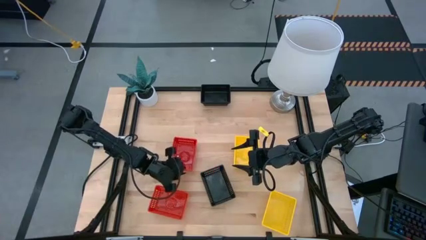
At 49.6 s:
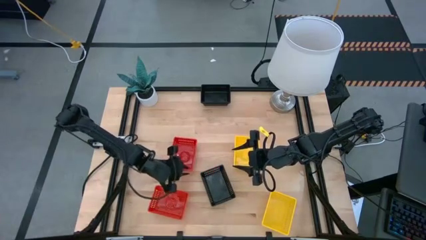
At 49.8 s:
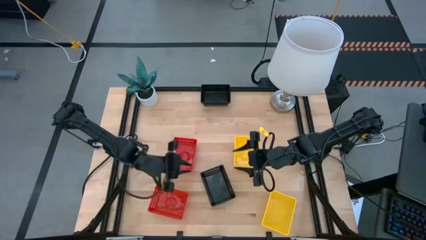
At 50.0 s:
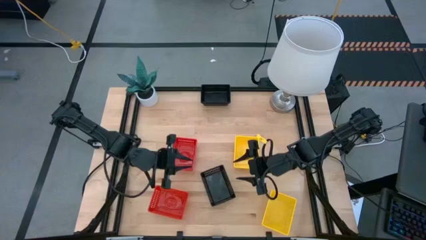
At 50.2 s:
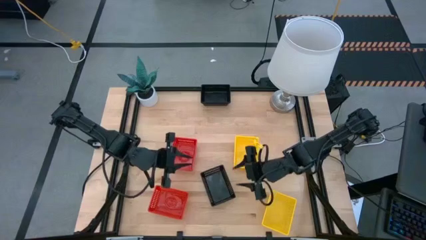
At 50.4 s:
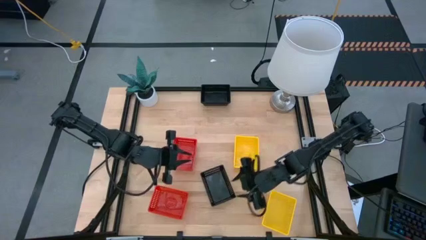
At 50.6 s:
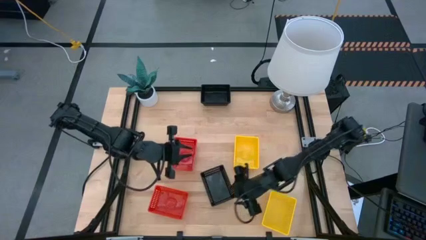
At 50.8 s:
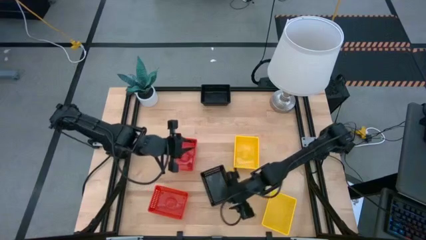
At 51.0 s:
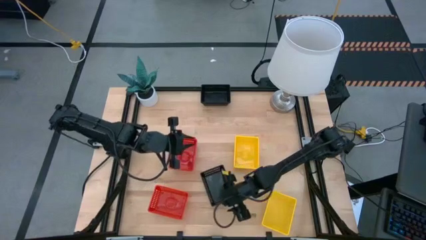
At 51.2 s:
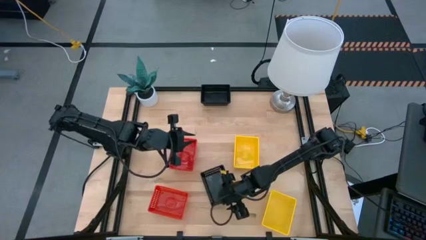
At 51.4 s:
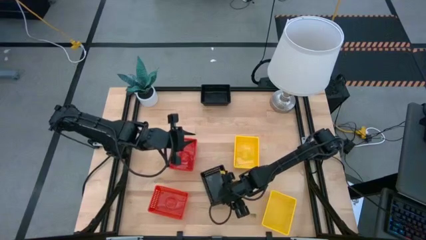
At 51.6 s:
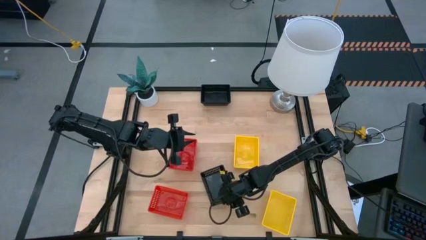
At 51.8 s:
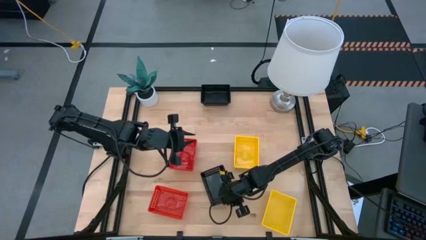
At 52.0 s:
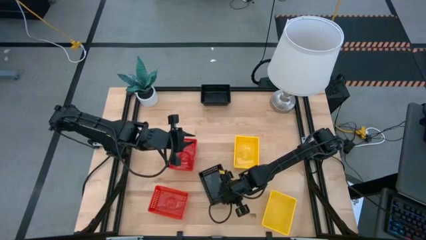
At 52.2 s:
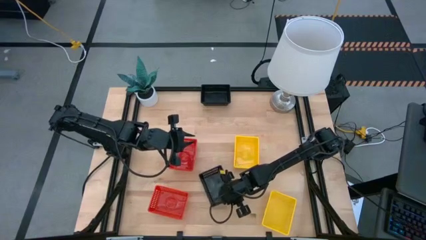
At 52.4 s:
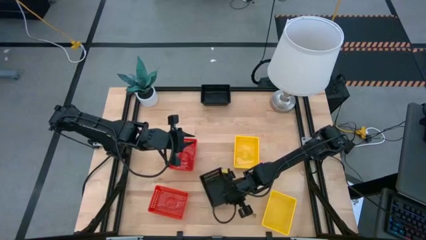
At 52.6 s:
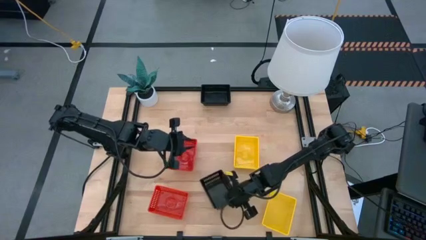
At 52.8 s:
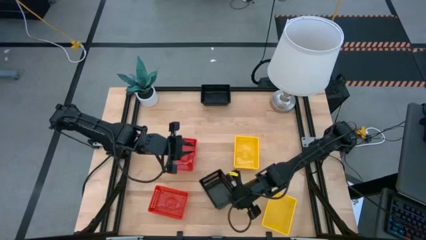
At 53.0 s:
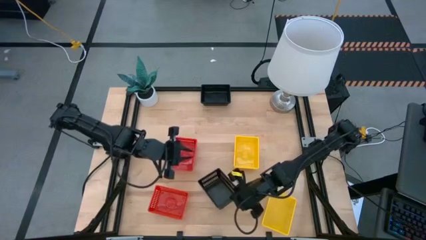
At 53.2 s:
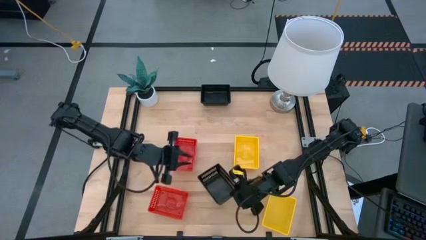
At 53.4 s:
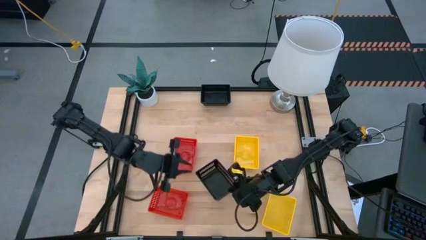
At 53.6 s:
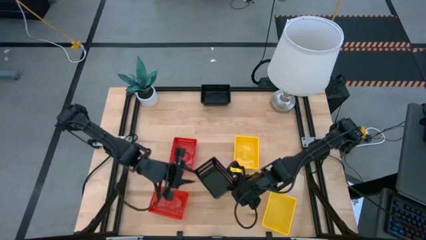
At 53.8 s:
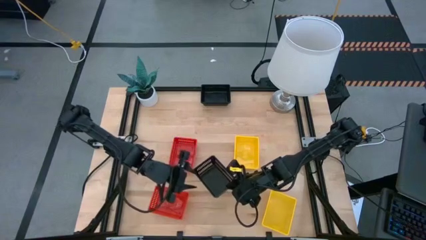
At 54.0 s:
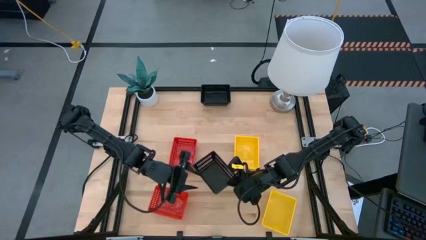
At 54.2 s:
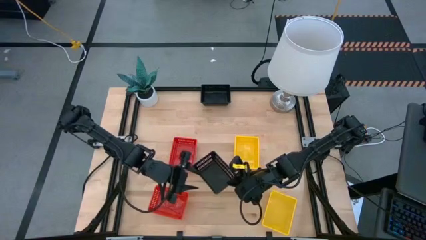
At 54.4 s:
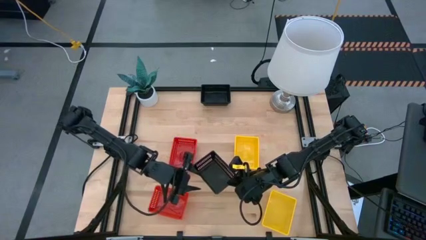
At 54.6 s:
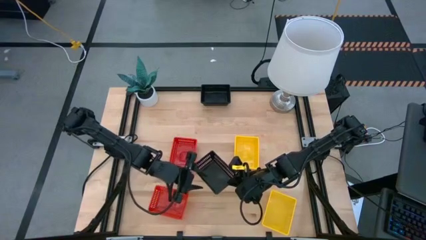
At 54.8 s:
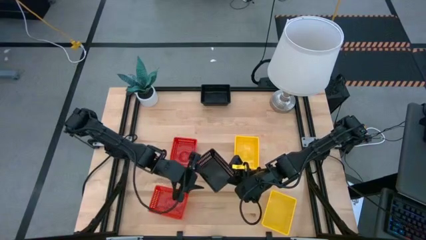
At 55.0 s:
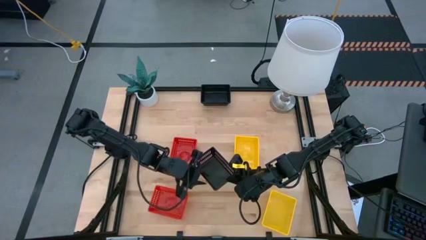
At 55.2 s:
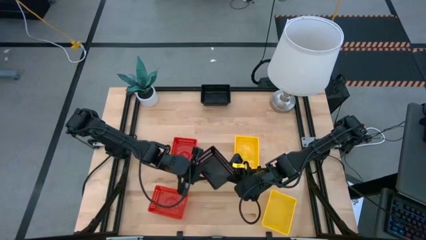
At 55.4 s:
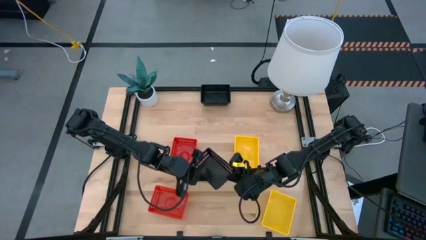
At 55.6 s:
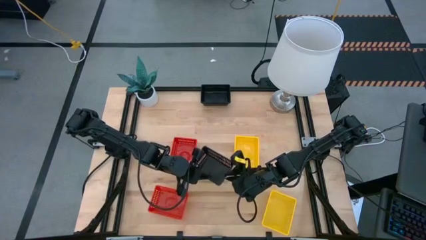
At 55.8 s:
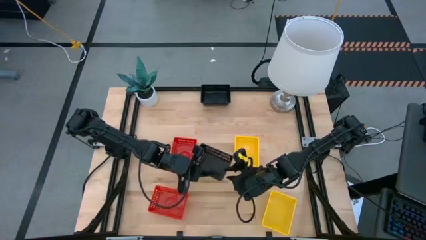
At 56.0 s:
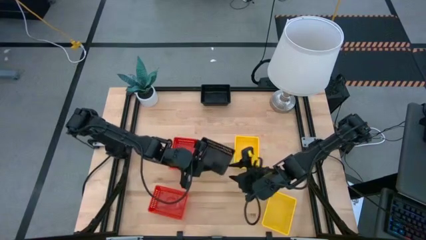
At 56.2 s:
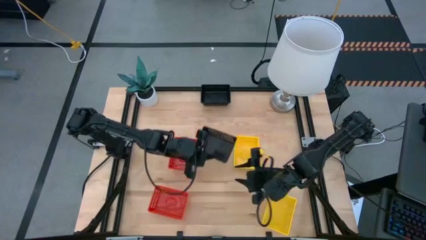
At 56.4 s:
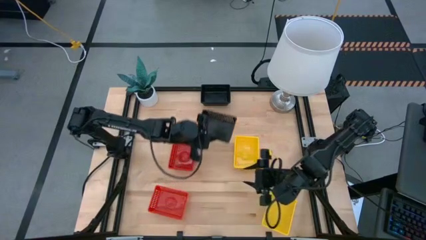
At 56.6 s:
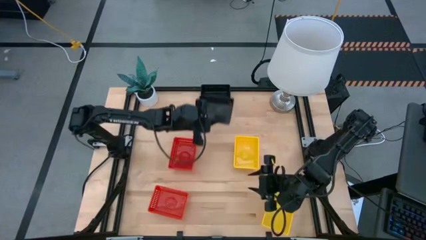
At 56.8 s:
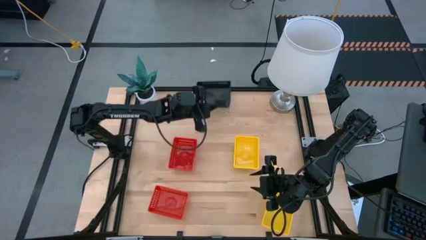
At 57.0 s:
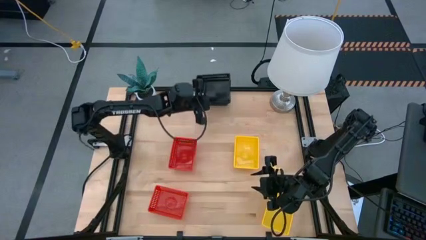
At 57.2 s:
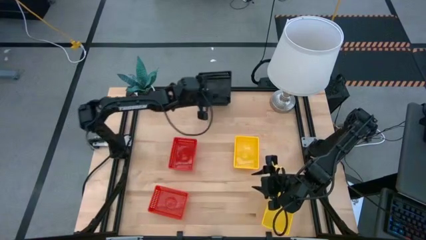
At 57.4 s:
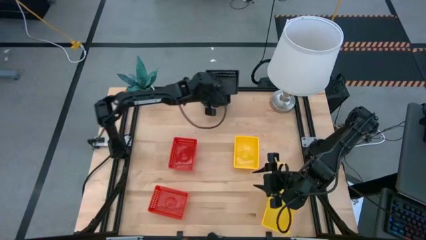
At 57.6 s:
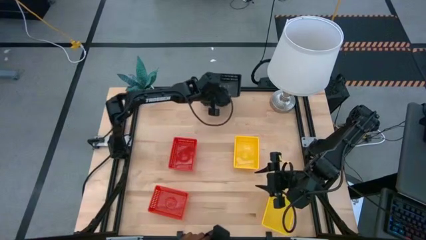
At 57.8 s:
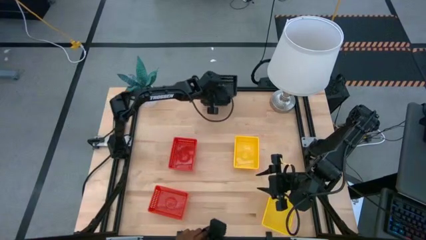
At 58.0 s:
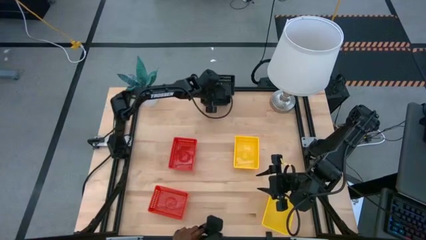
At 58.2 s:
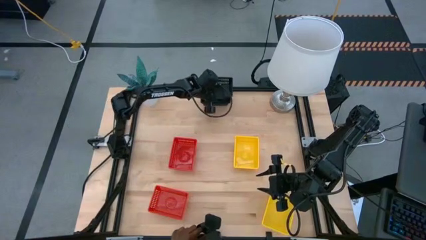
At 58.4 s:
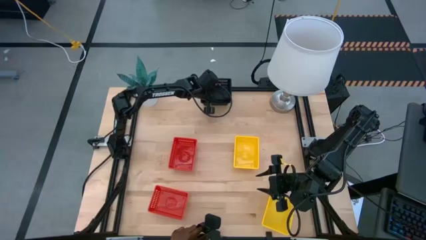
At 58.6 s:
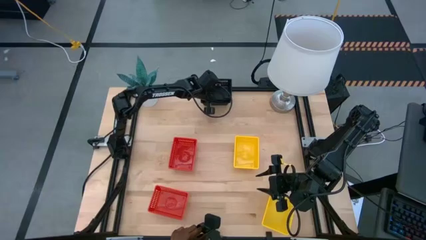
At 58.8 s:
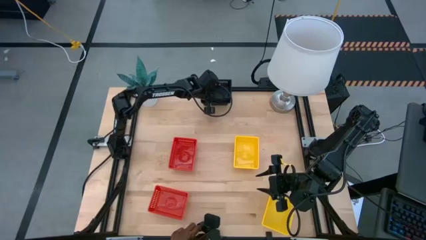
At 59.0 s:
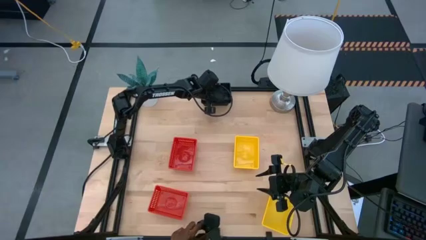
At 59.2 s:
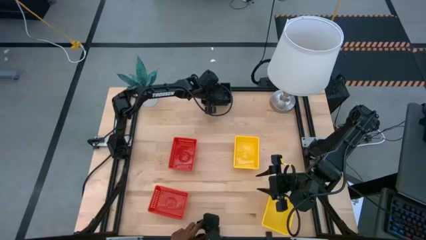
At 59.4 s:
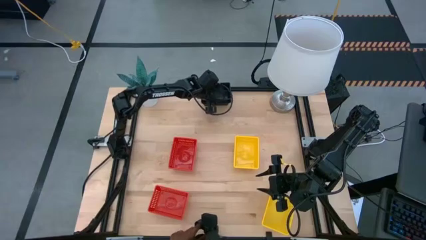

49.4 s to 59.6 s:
Stack the bottom black basket on the stacked top black baskets
